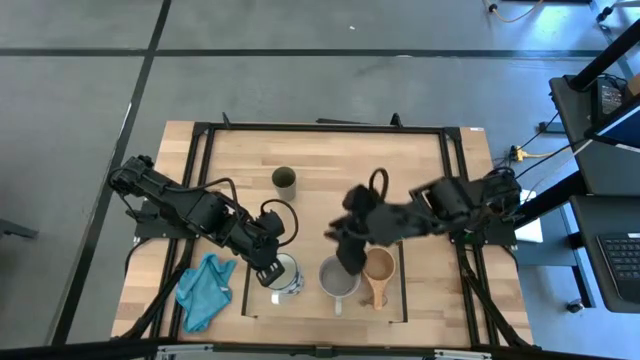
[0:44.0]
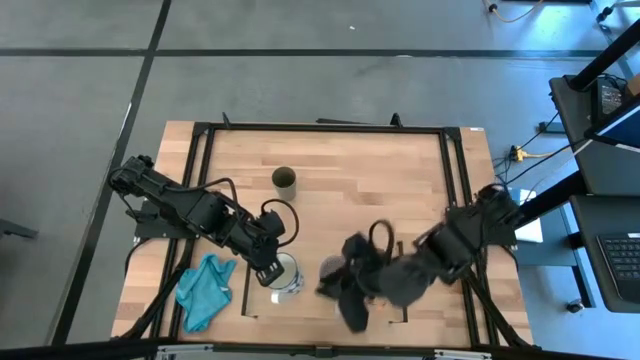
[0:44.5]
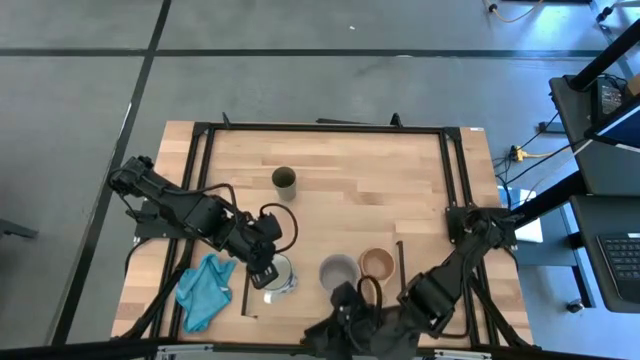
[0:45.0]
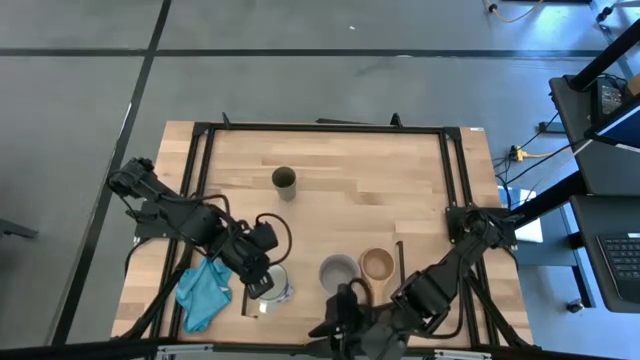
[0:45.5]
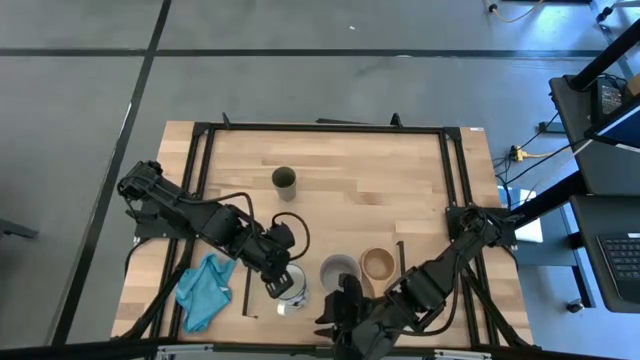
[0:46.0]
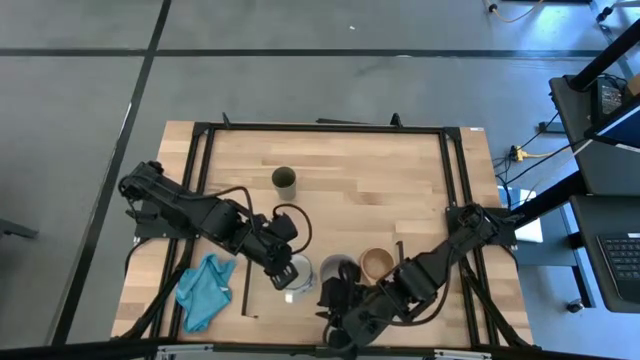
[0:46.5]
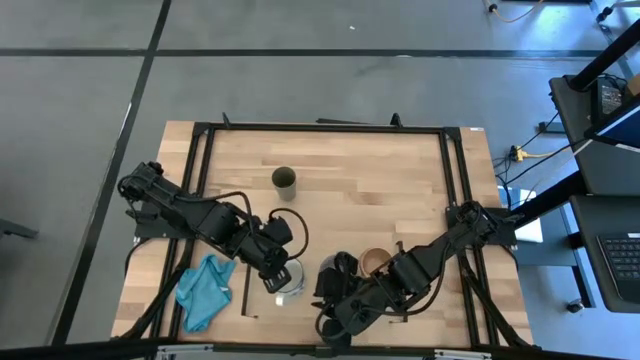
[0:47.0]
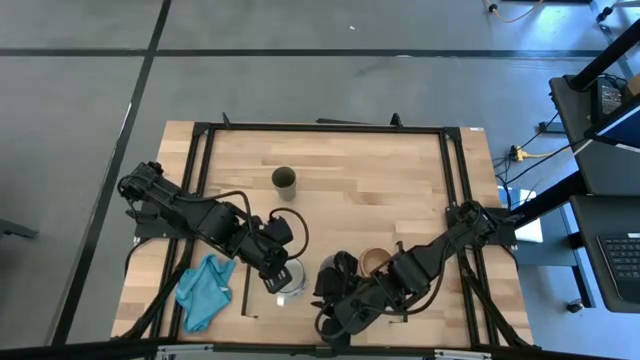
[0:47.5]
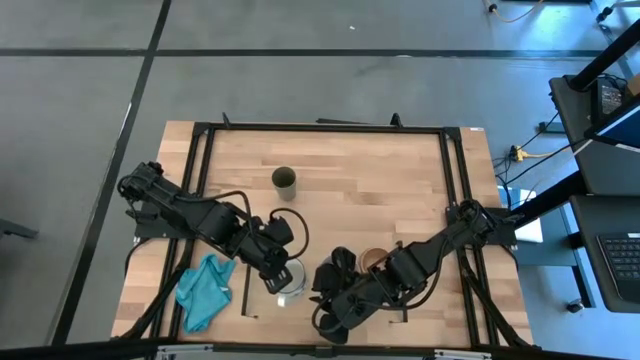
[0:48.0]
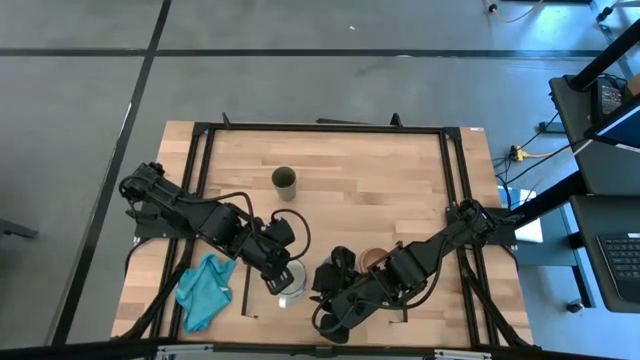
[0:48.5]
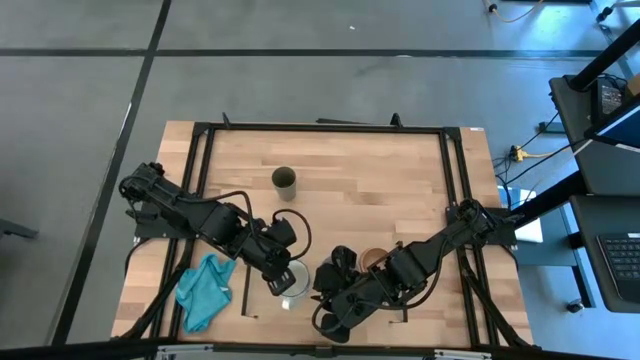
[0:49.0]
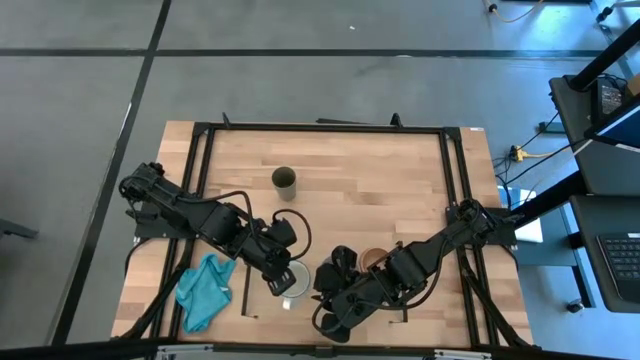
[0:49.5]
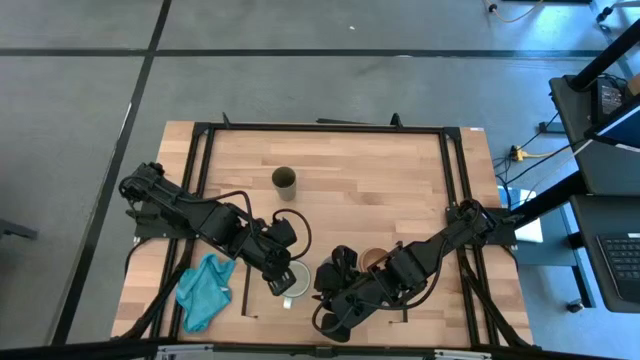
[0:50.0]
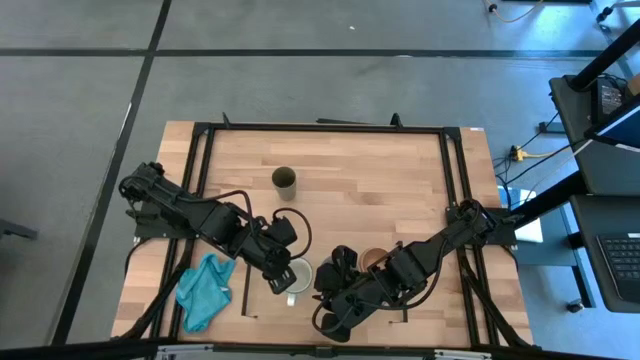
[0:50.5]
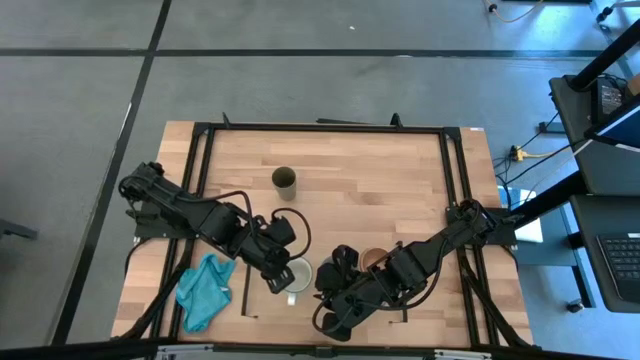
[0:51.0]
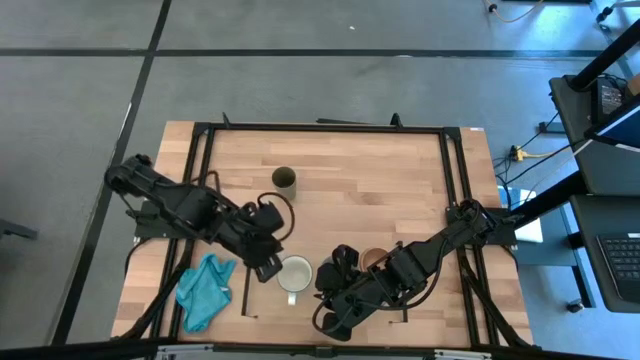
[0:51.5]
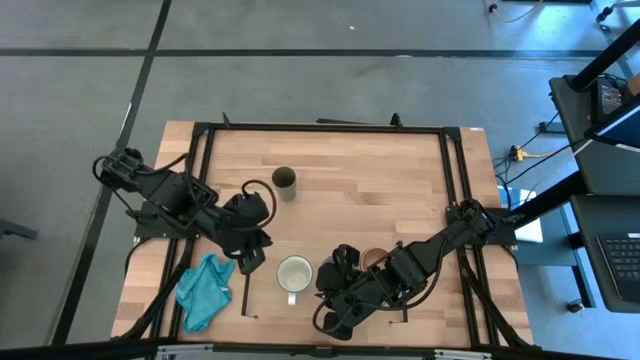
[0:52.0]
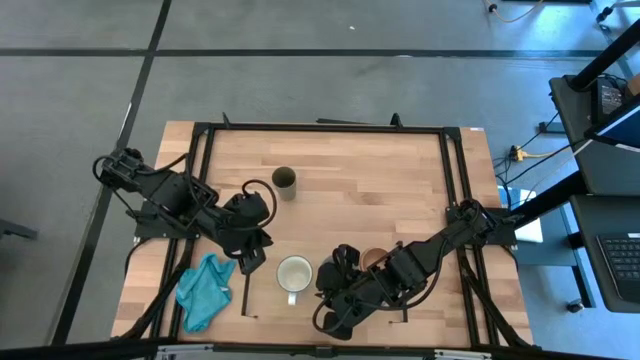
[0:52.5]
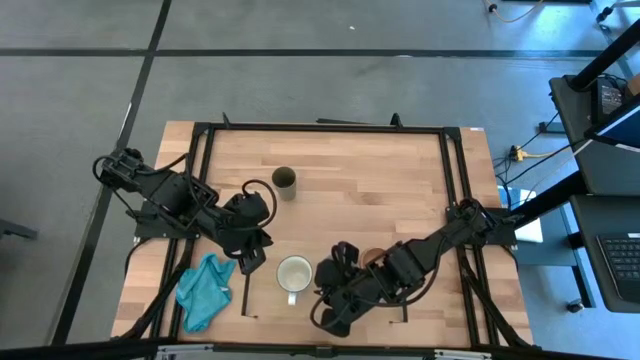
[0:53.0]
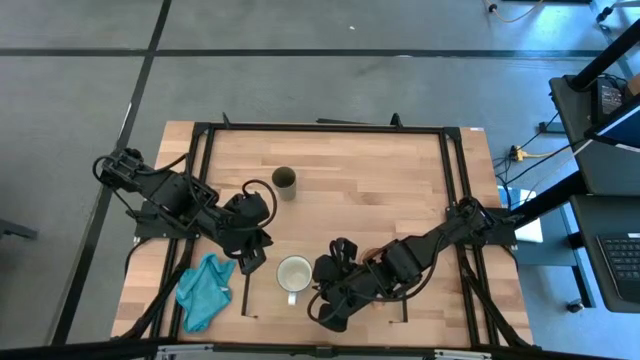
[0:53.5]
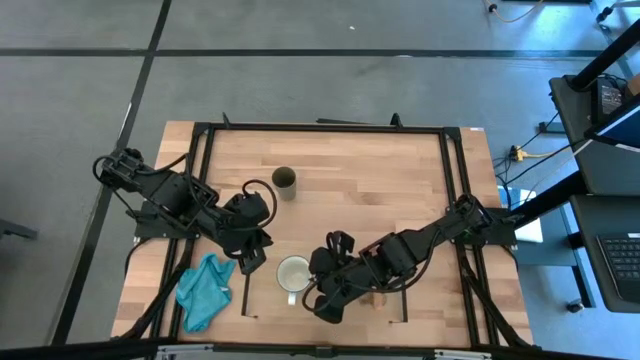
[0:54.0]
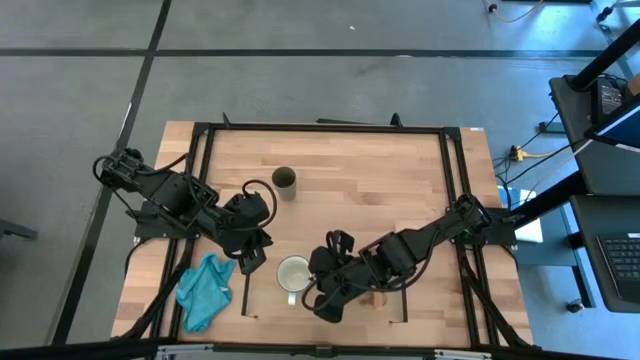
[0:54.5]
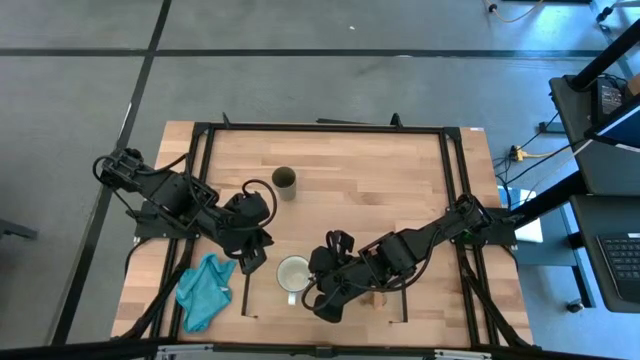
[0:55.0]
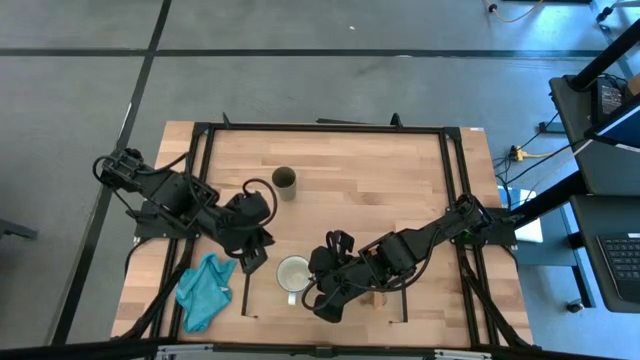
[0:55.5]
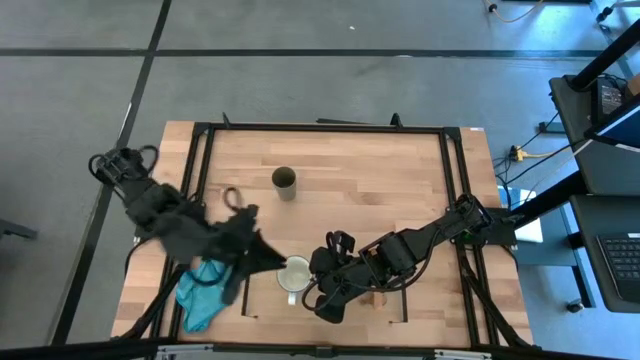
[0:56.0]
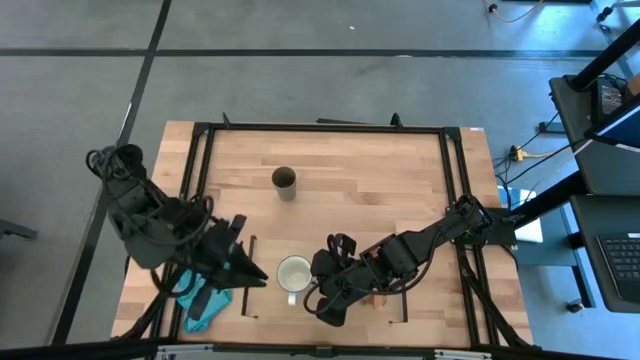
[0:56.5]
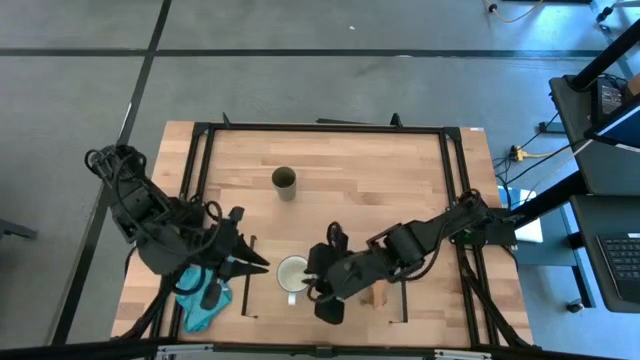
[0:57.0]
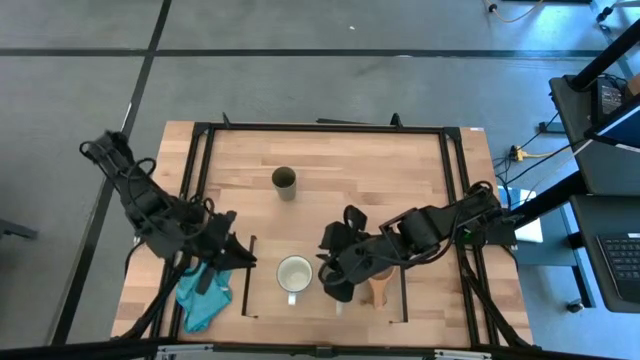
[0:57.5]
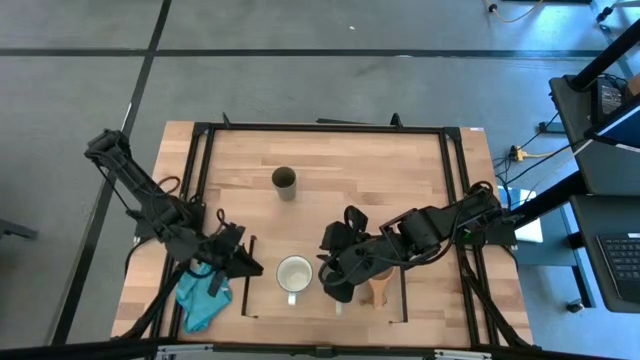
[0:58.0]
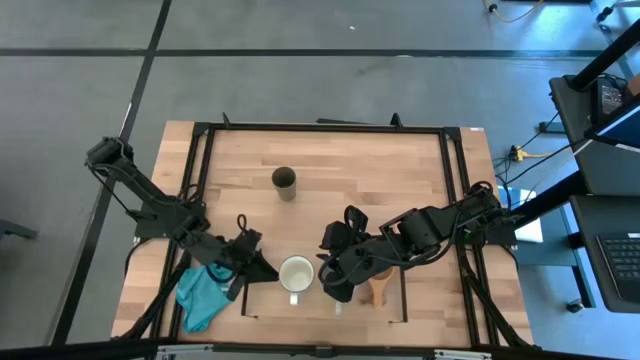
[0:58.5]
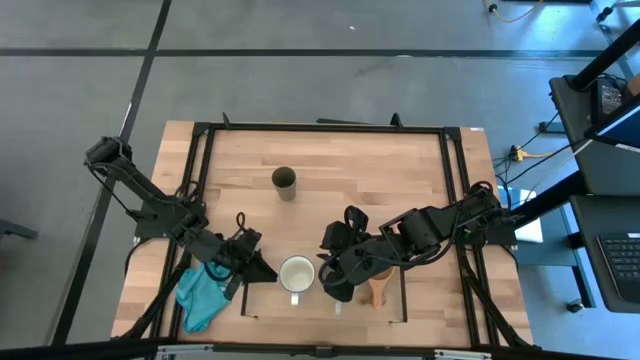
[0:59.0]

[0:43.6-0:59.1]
Task: Stack small to large cups/mugs on shelf
Put the white mug on the shelf

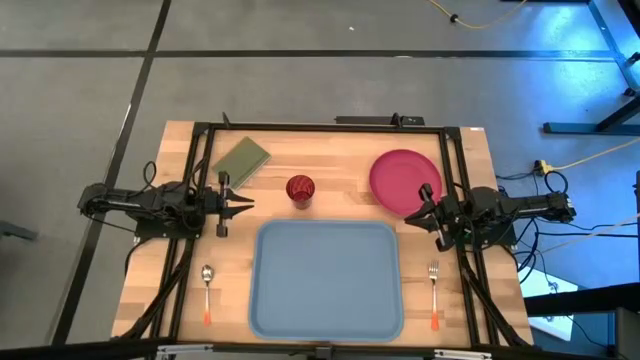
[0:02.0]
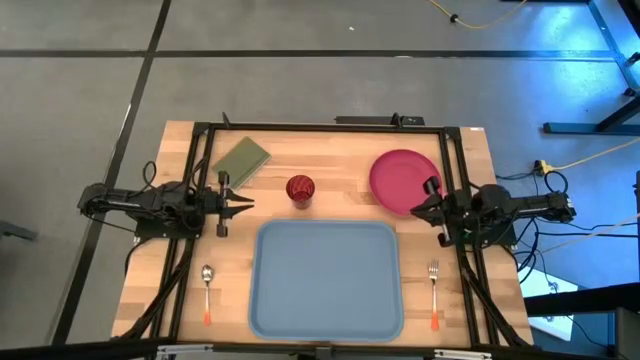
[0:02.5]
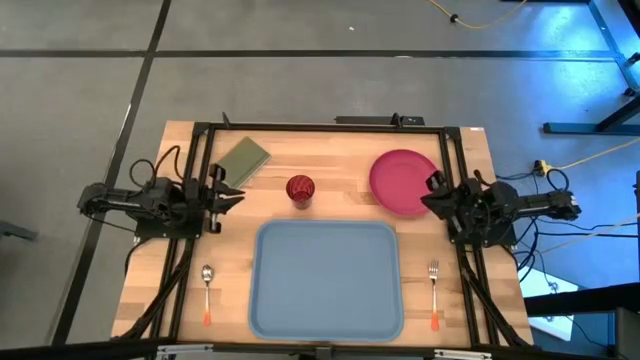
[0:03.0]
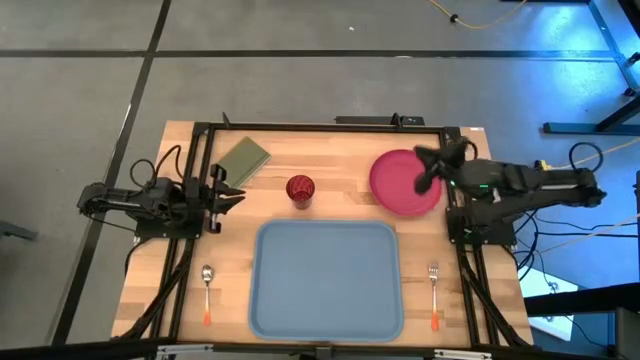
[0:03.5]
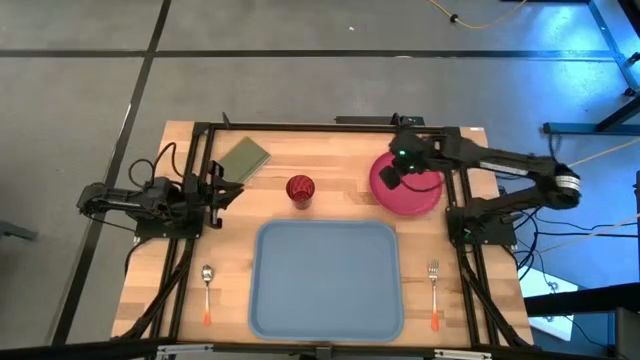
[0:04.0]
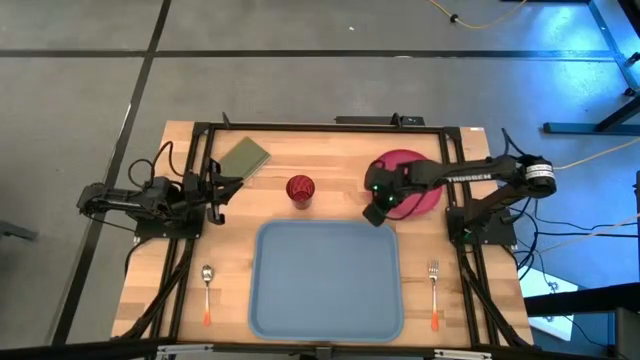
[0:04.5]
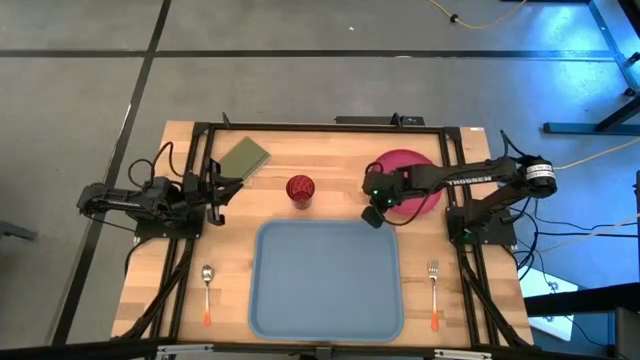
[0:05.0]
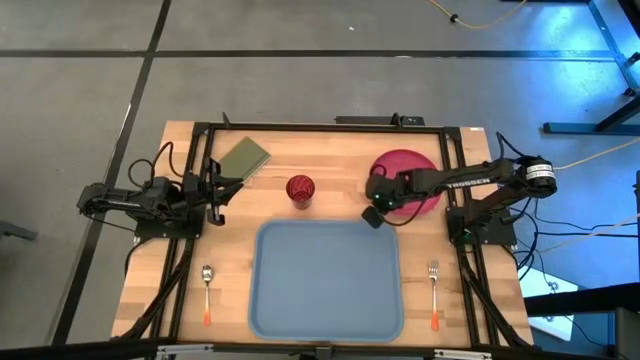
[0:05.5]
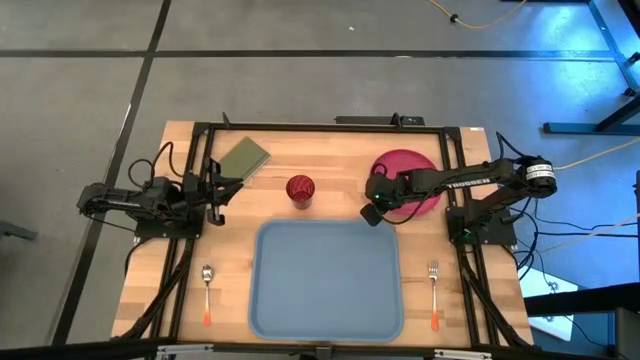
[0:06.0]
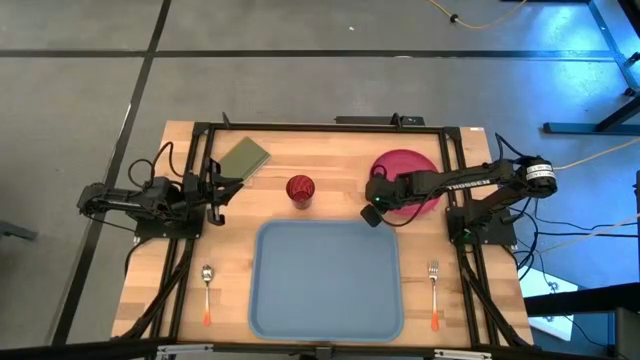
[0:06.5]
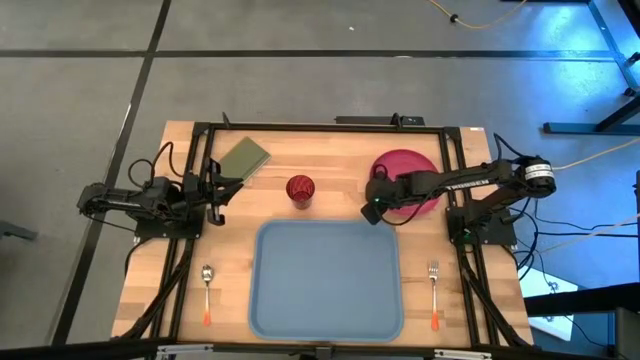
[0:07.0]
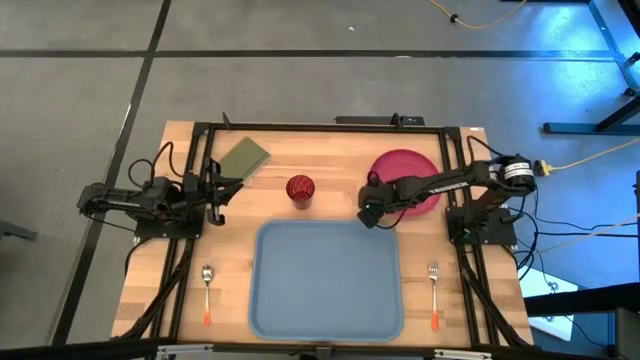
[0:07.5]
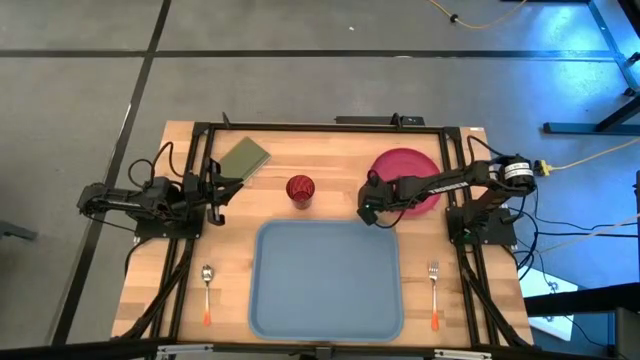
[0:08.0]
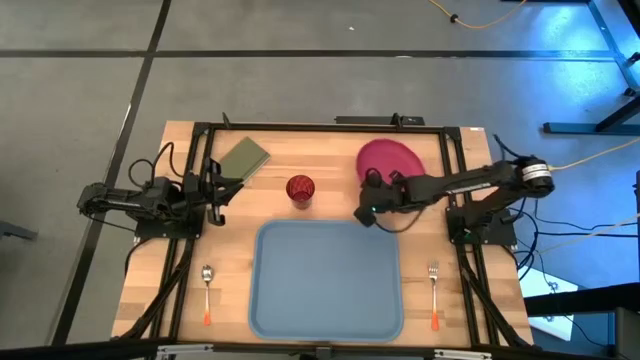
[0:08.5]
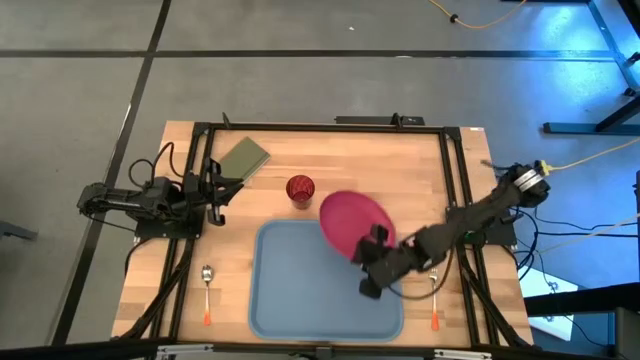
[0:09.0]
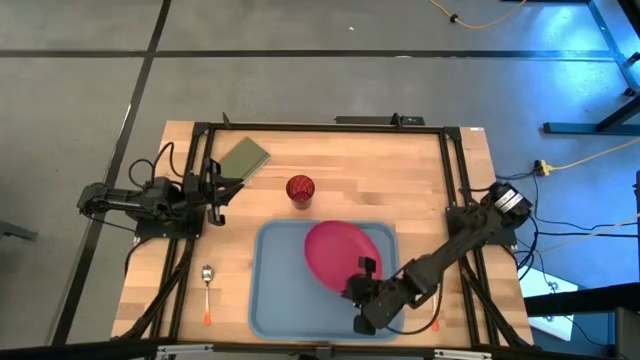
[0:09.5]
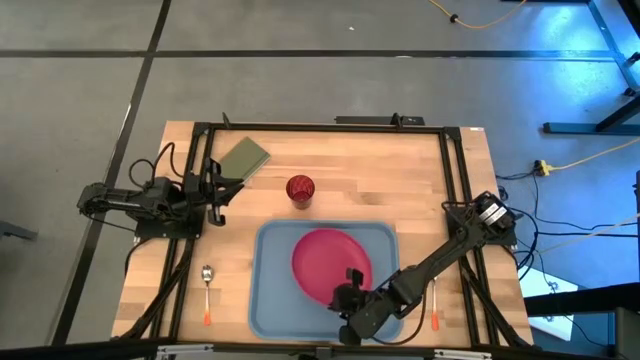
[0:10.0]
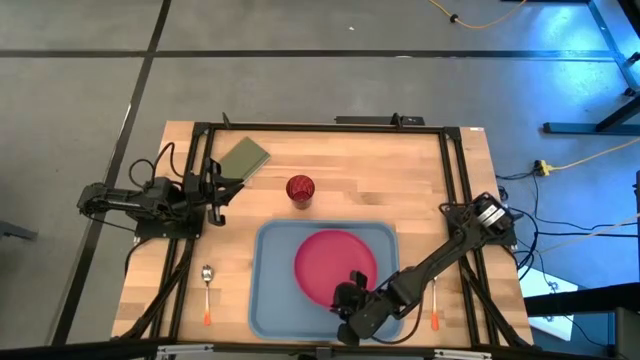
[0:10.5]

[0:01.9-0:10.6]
Task: Pick and place plate/cup/fork/spoon on tray
Put the red plate on the blue serving tray
